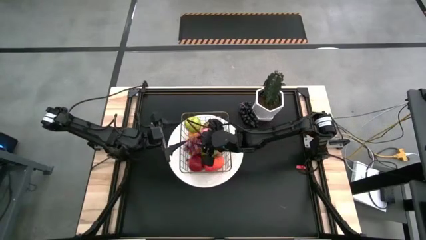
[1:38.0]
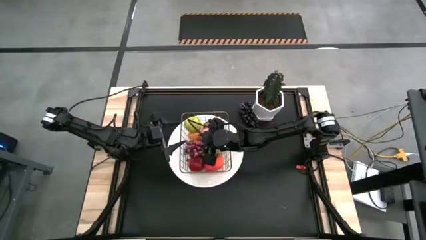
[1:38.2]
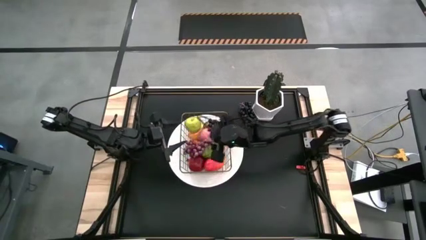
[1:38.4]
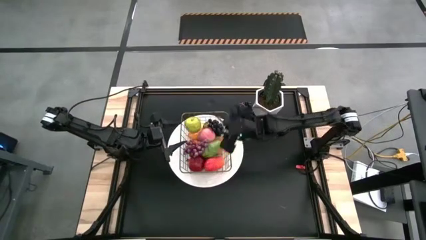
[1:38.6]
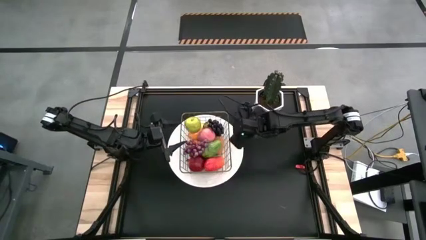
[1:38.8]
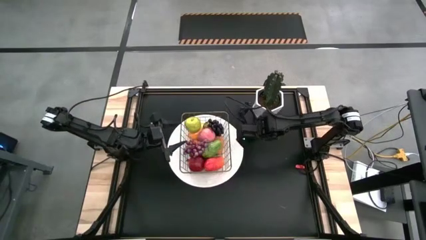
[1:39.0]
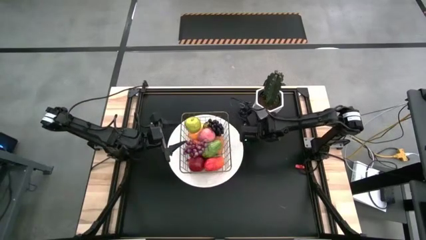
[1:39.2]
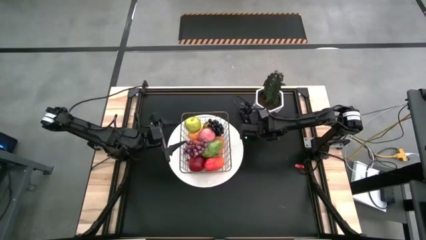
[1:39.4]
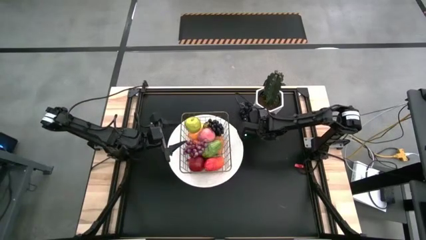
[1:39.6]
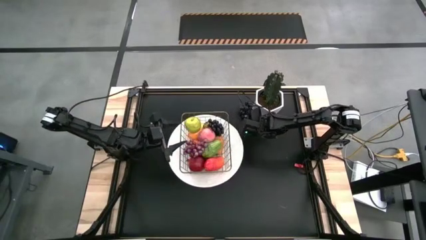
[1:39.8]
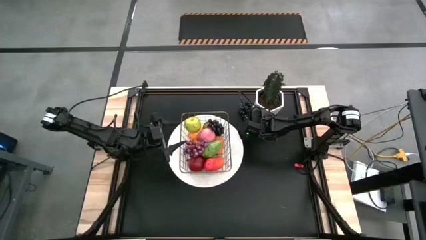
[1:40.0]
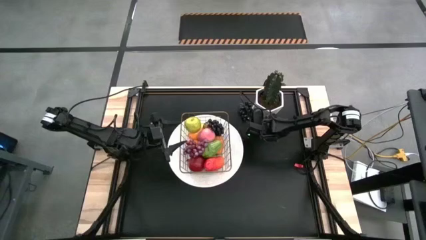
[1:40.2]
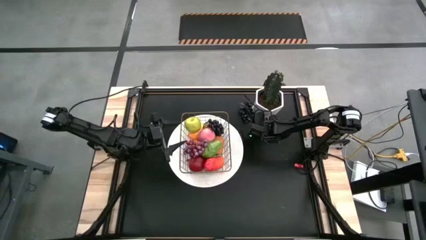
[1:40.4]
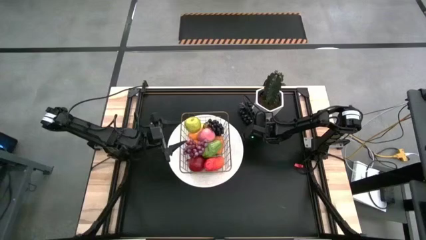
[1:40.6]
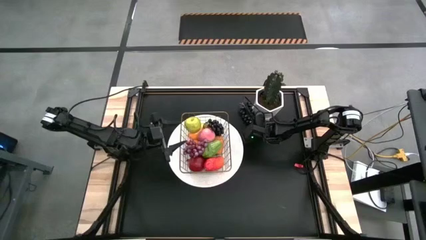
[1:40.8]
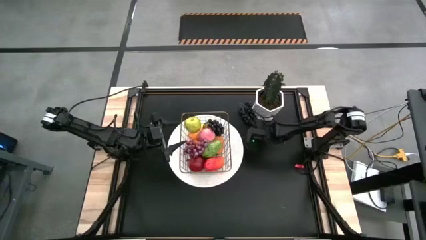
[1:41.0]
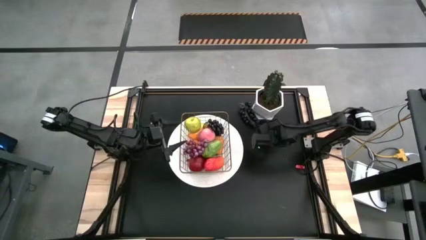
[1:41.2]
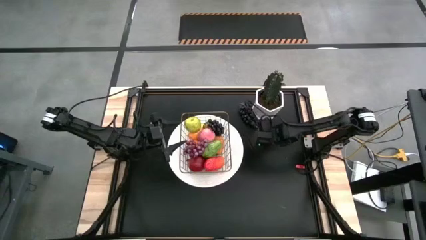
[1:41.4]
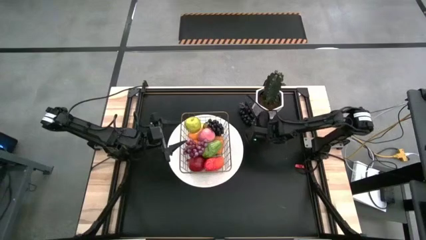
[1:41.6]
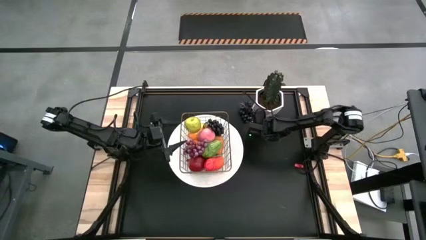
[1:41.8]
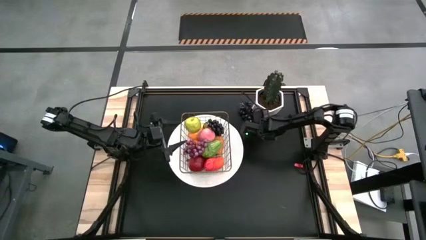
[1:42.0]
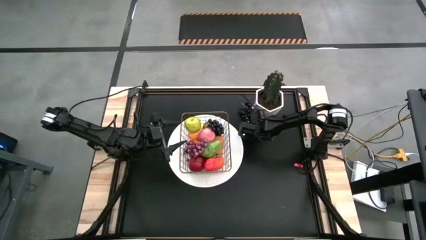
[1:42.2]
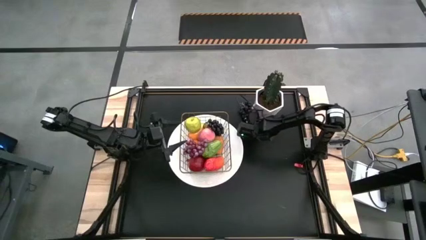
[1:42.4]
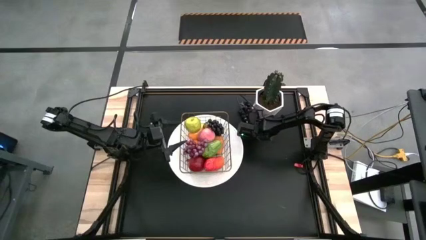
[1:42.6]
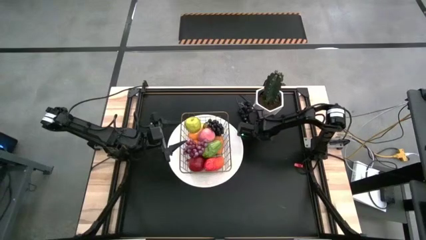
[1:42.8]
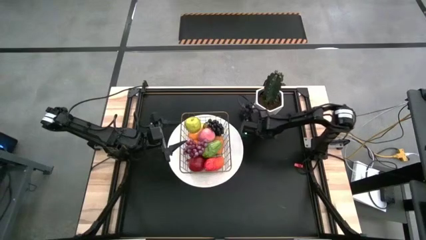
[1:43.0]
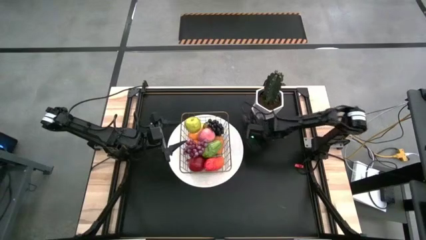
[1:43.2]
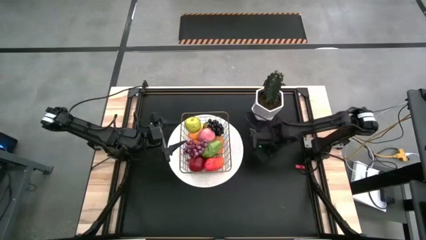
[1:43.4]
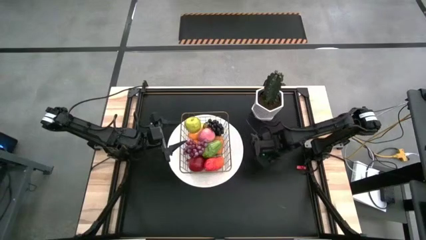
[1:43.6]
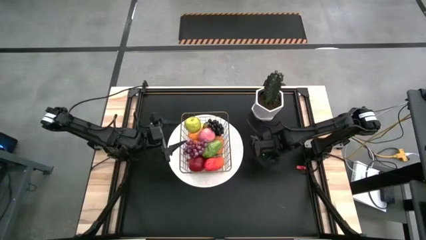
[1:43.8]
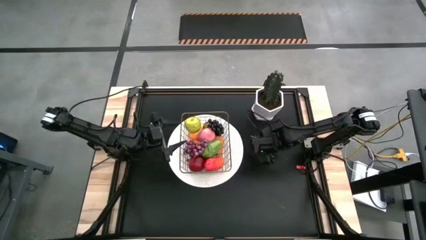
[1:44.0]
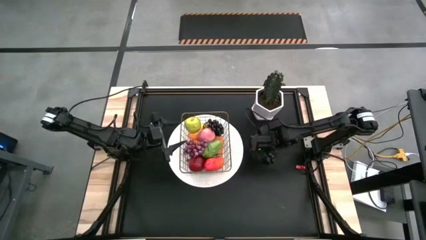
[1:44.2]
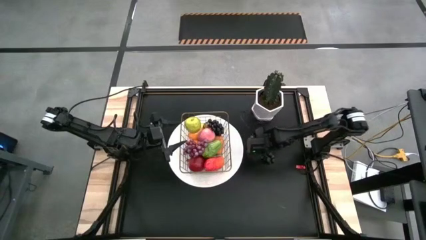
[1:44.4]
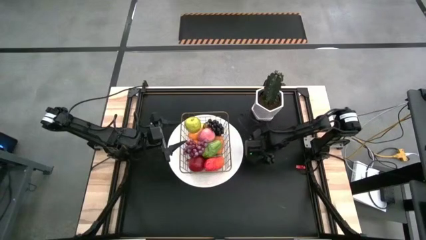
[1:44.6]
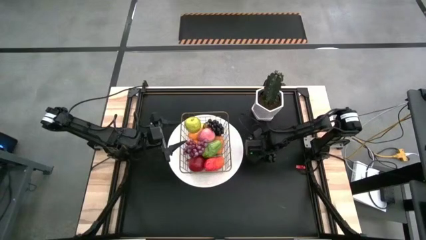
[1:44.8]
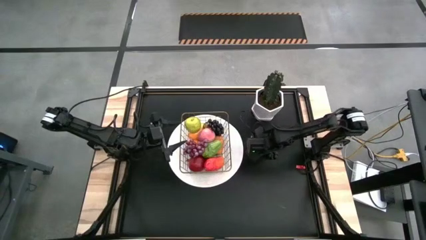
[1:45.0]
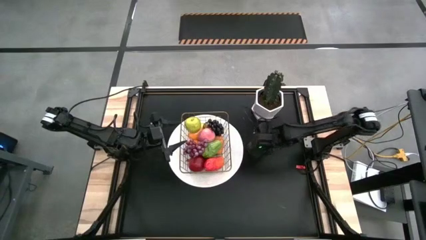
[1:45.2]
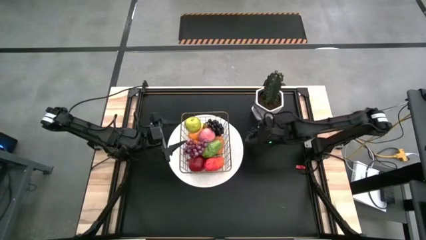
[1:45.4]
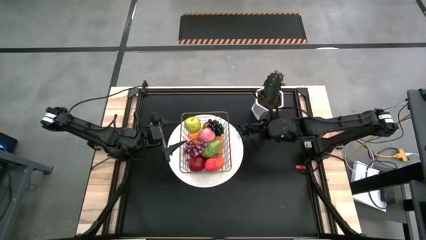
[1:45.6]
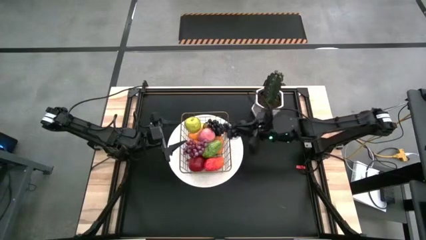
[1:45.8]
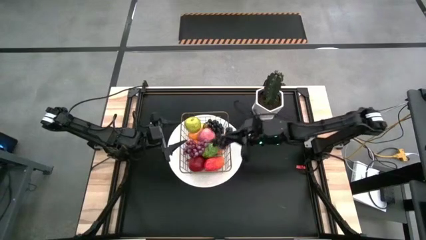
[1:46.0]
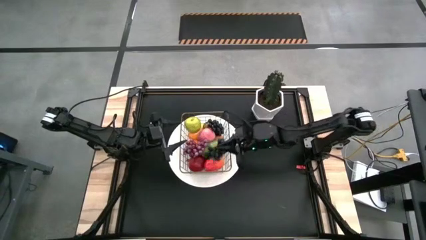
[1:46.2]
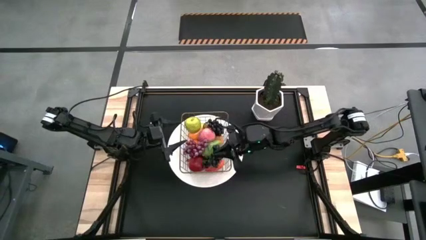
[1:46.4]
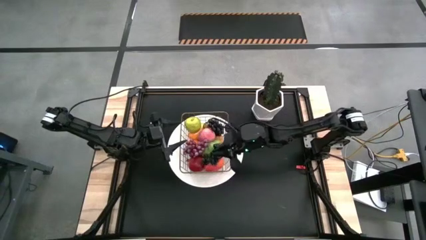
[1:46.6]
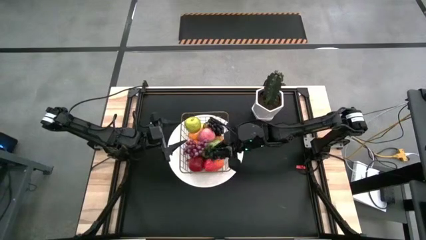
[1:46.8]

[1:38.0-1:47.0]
Task: Build produce basket
Put the black grapes into the wire basket

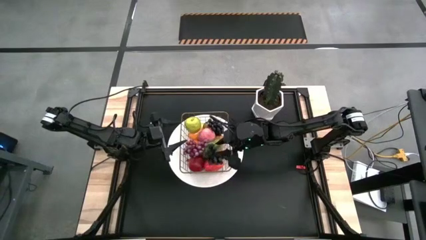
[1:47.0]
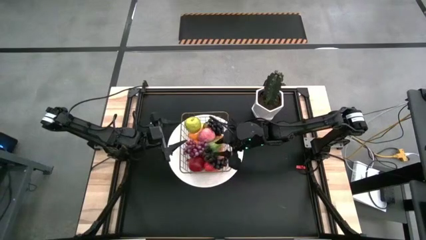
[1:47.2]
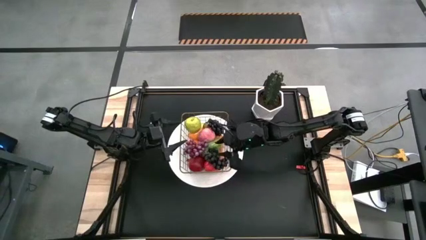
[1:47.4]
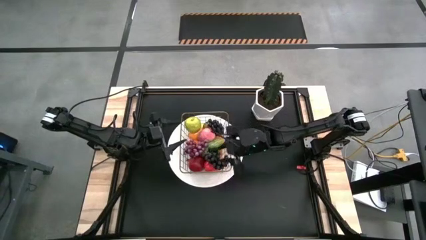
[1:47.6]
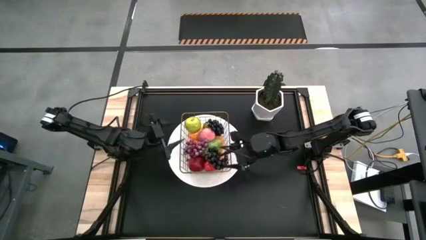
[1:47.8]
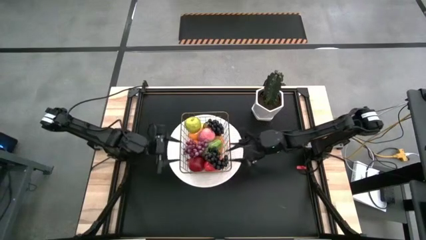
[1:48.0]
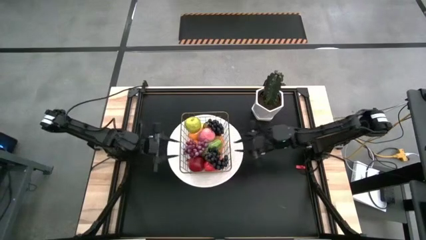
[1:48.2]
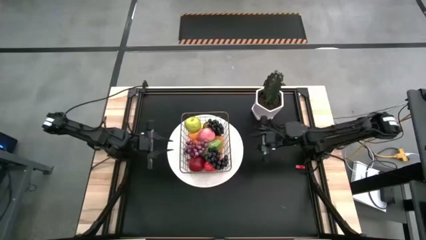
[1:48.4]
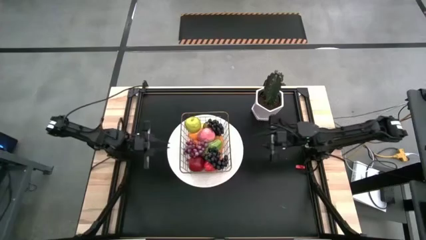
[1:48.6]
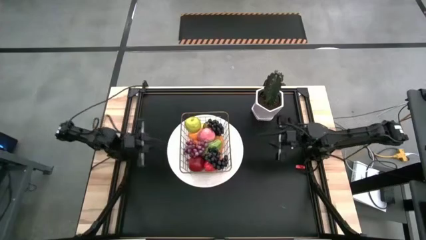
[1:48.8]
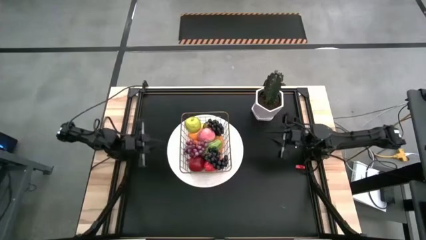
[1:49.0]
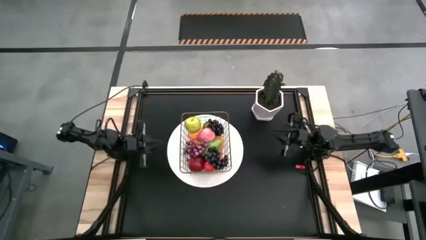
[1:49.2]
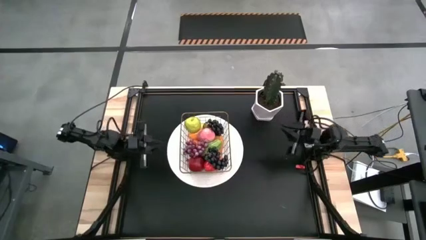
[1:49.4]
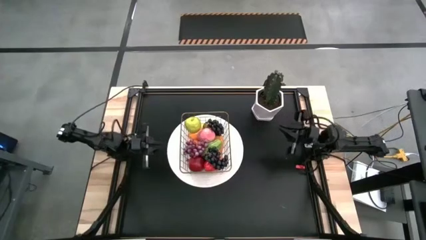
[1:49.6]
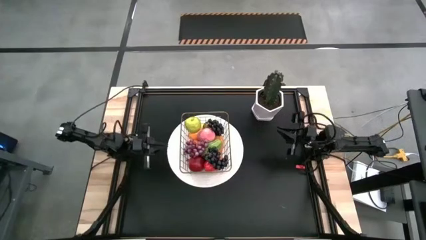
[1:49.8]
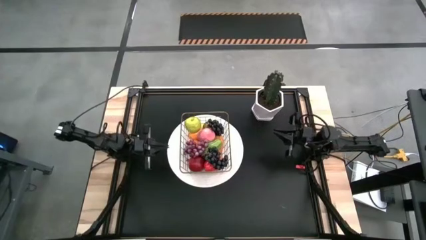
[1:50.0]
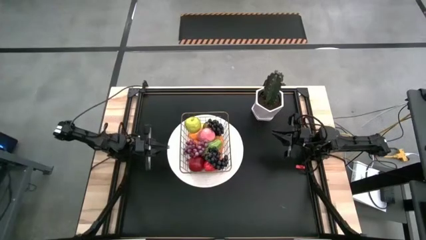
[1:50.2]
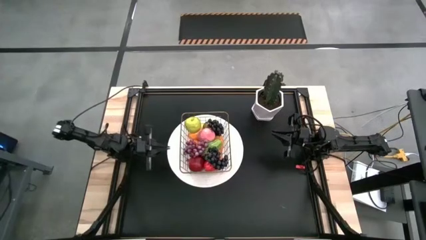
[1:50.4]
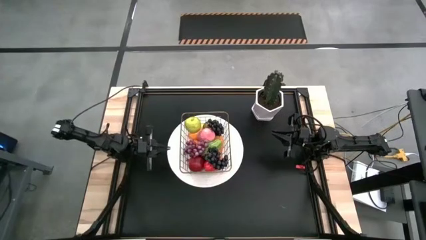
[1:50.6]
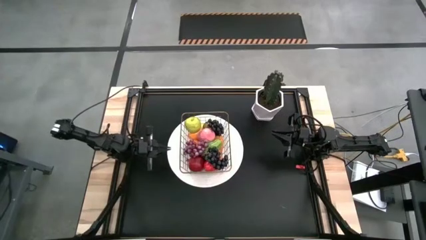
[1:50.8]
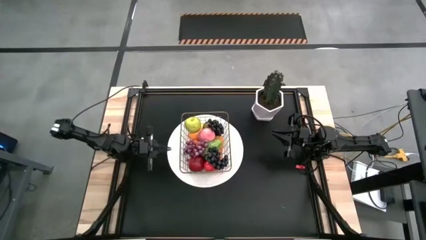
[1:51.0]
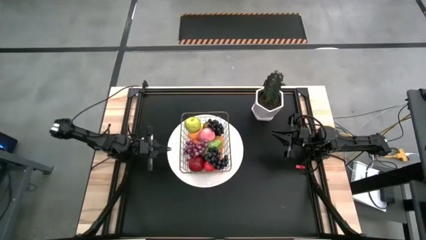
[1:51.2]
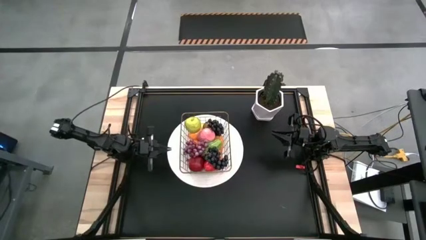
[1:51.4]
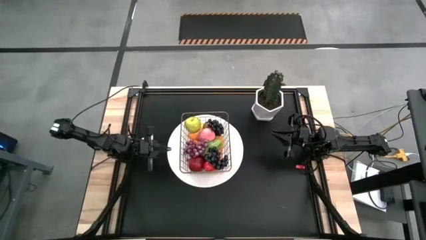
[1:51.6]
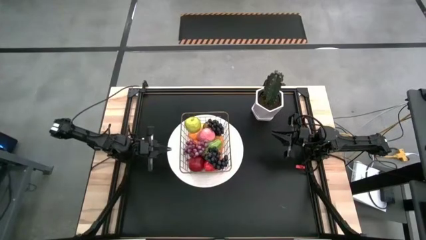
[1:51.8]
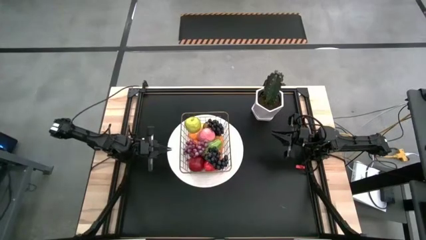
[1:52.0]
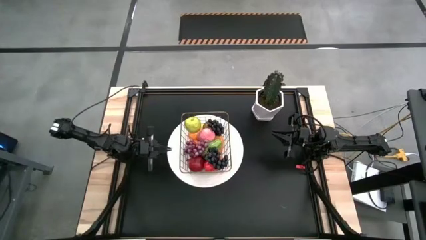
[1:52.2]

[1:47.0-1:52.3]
Return to Home Position

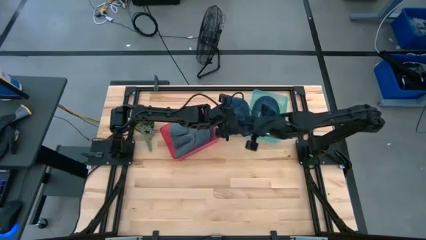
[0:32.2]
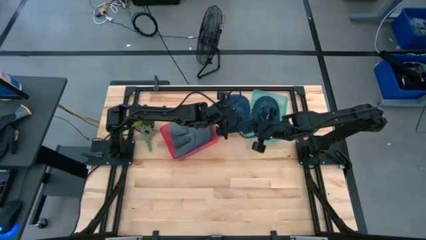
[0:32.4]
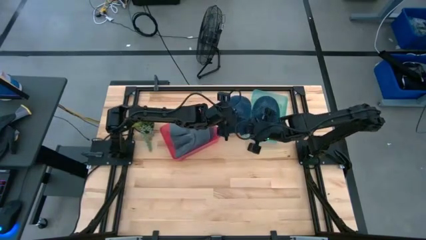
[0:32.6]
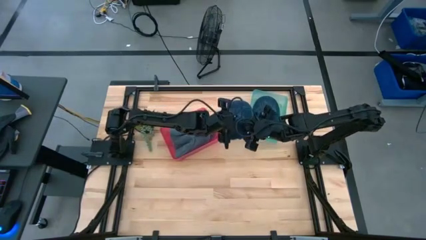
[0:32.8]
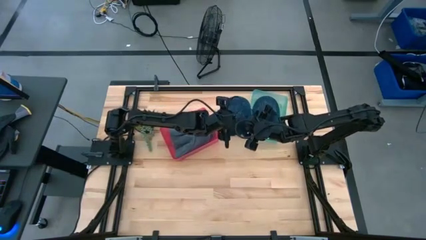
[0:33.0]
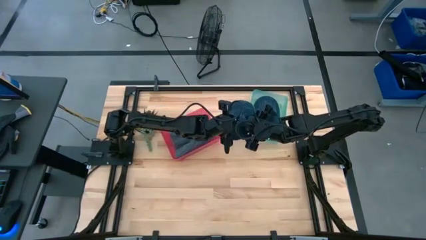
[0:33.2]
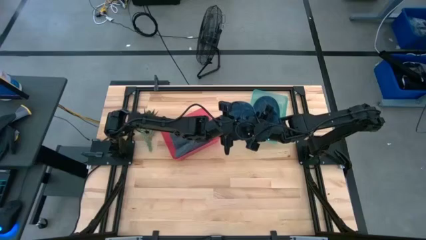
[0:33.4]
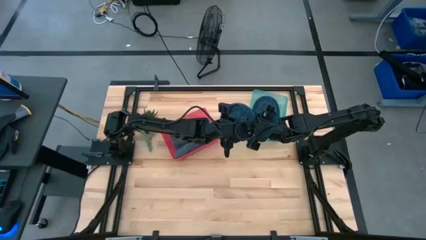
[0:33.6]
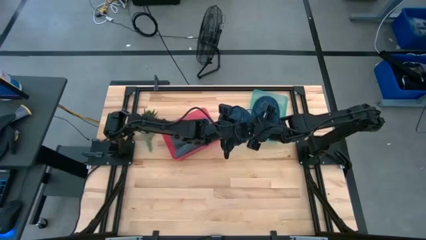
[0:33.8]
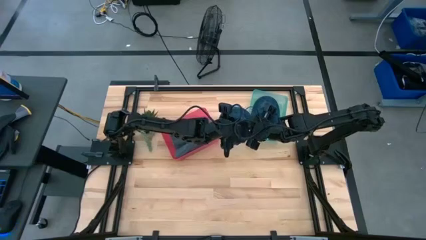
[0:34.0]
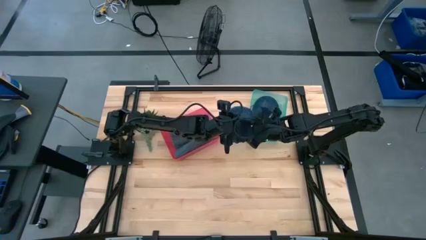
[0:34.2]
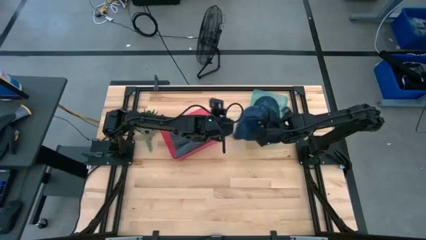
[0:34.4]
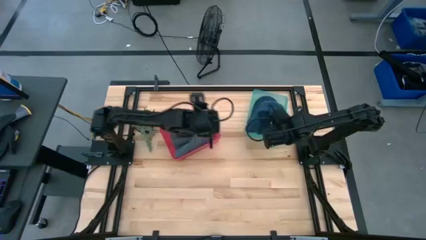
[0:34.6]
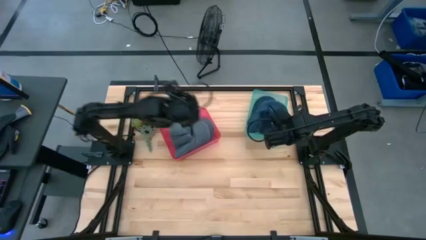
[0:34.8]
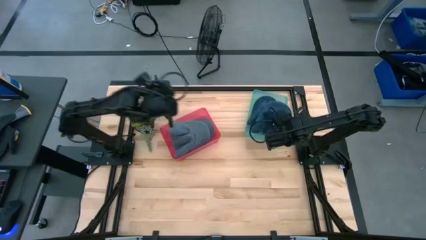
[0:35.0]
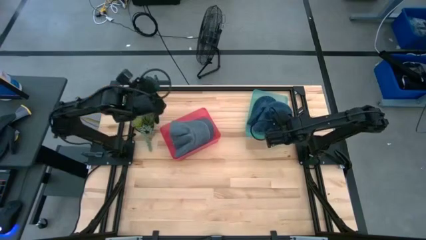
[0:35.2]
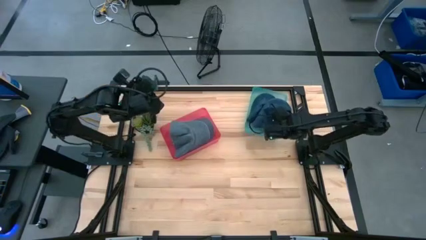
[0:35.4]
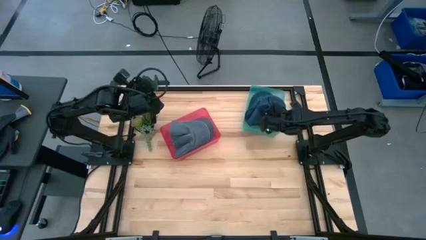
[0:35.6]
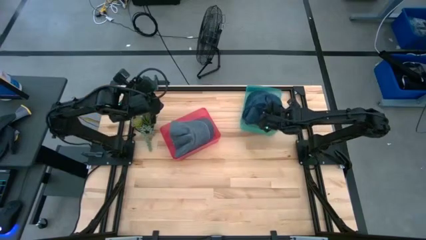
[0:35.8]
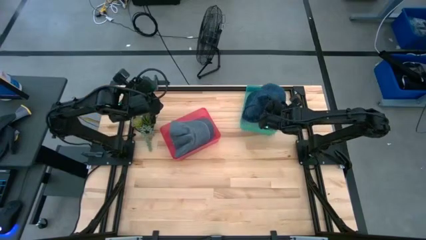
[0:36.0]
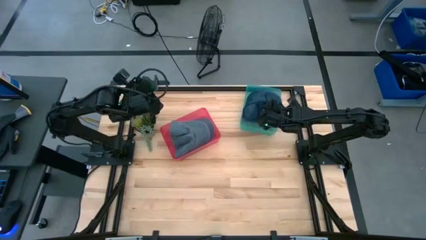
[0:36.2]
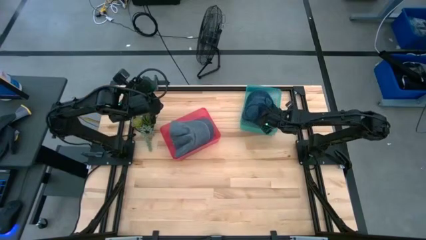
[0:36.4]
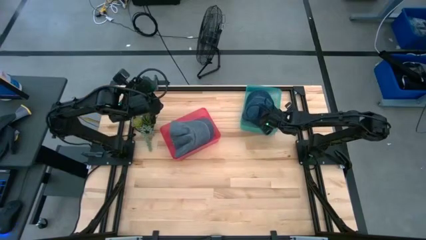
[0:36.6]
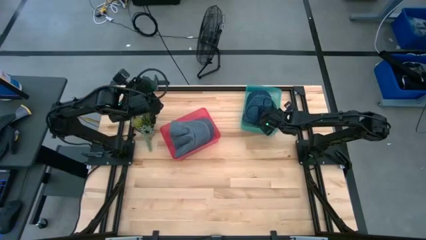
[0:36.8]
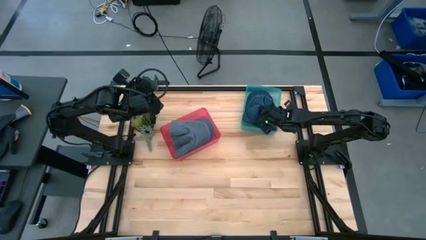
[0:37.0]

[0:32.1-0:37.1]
Task: Pick & Place hat
Put the blue cap into the green bin
